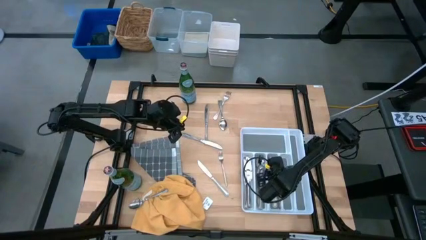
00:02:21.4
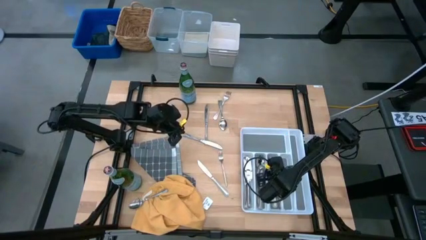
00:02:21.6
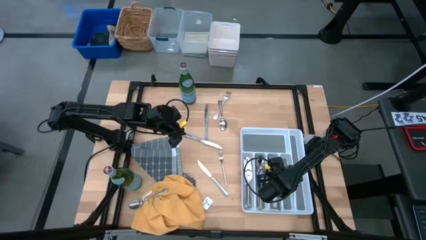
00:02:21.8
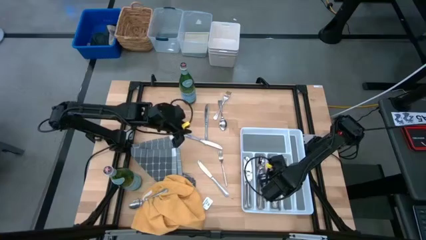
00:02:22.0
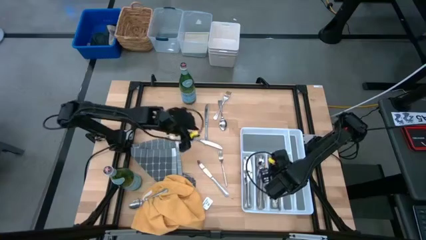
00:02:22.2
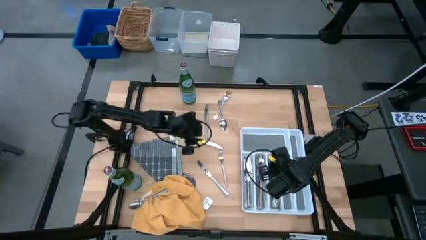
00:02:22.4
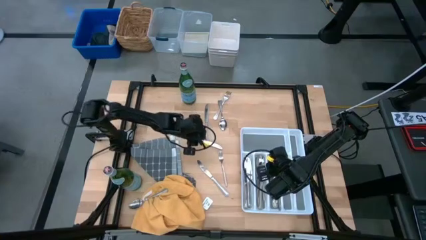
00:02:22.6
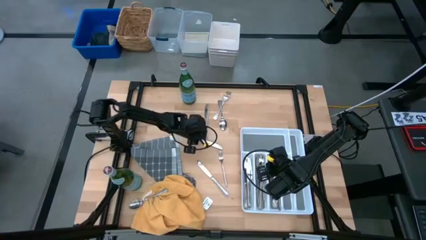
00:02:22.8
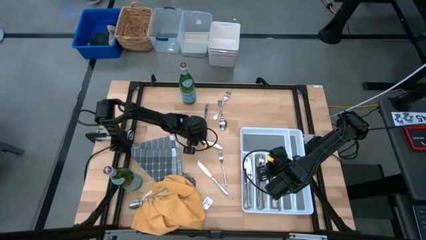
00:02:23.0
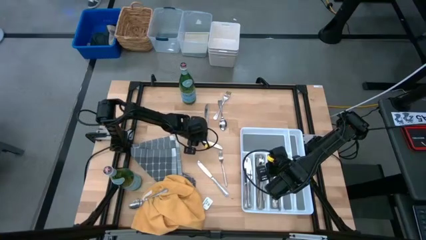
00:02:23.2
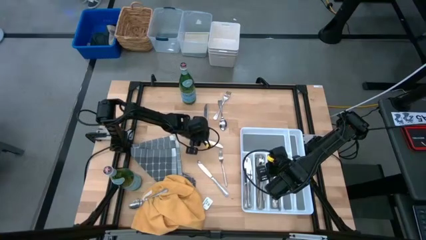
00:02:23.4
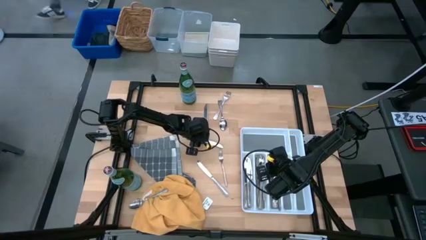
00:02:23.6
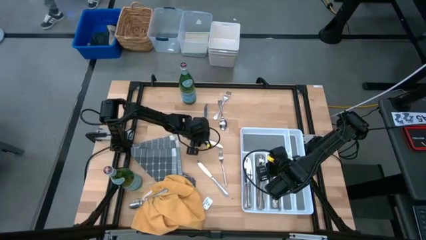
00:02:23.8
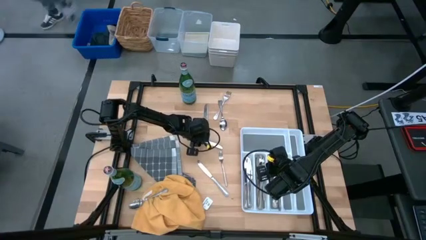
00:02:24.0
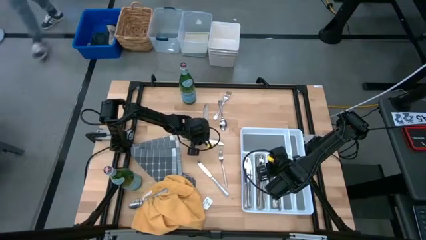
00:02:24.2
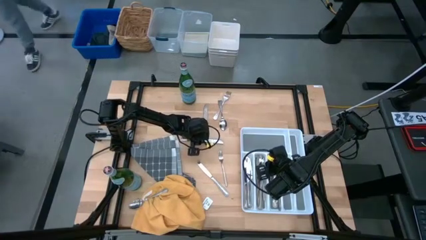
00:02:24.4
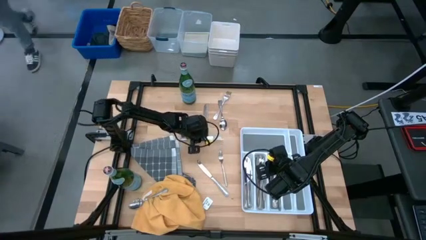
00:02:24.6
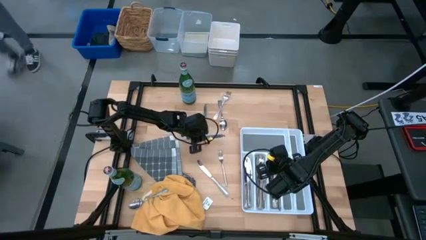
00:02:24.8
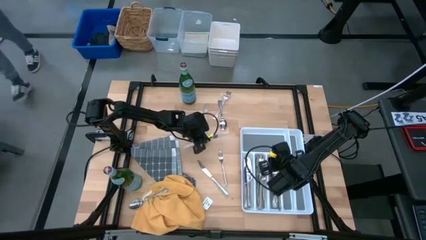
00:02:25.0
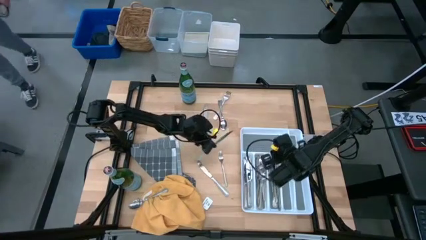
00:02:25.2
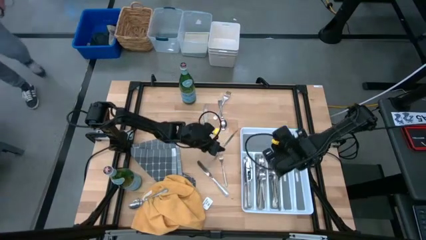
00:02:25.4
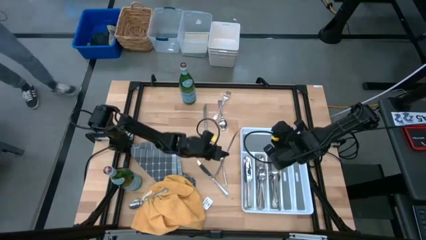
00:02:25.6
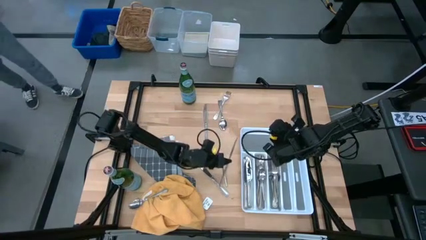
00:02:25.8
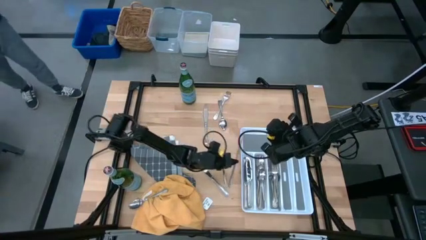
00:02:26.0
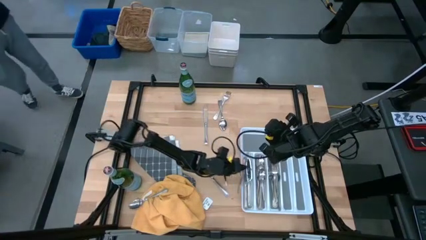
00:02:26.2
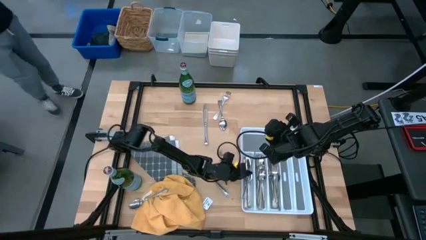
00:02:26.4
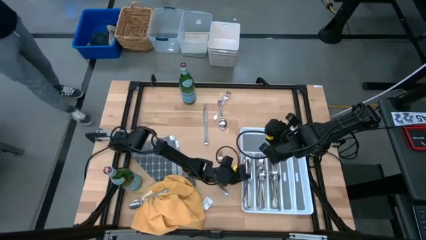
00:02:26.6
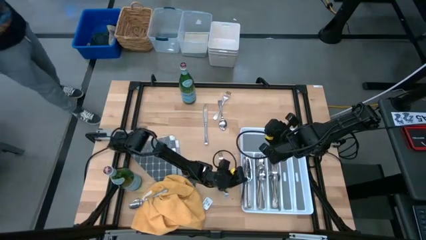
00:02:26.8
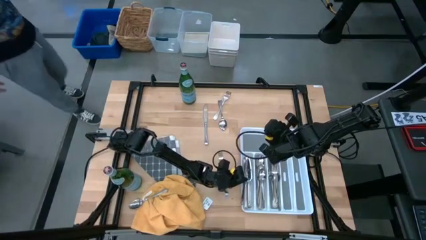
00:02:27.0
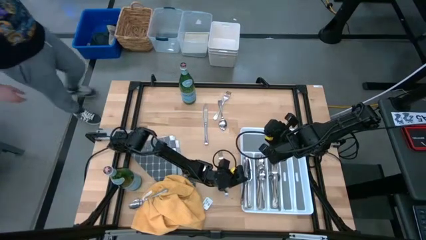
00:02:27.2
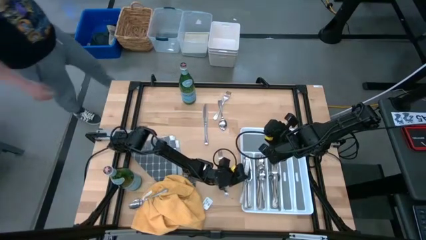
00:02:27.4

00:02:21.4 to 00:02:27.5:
Stack the silver knife into the white utensil tray with the other silver knives

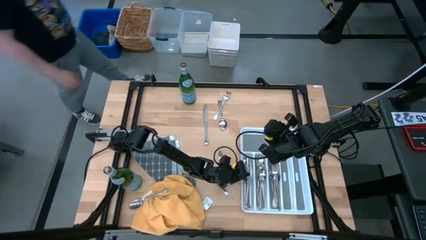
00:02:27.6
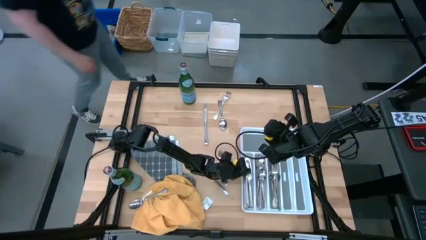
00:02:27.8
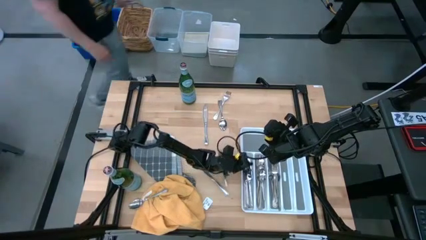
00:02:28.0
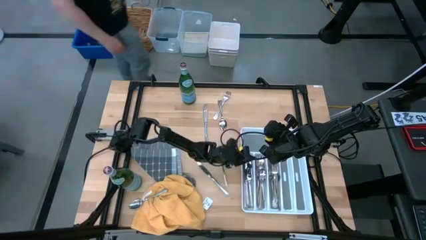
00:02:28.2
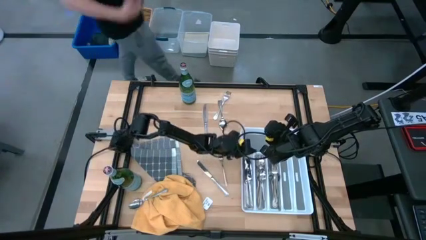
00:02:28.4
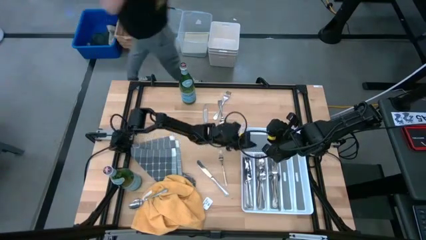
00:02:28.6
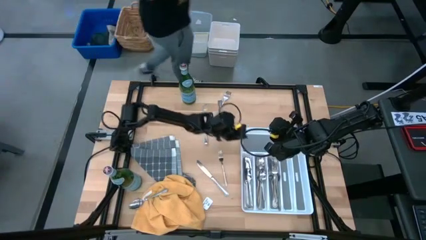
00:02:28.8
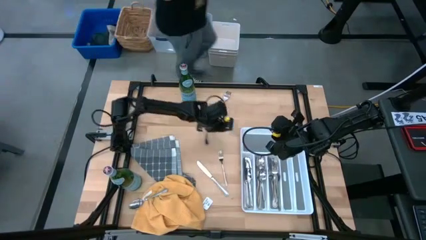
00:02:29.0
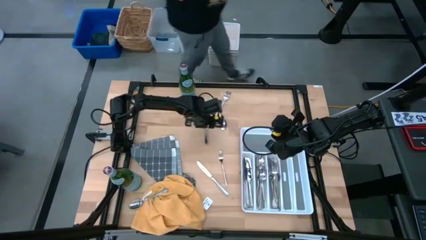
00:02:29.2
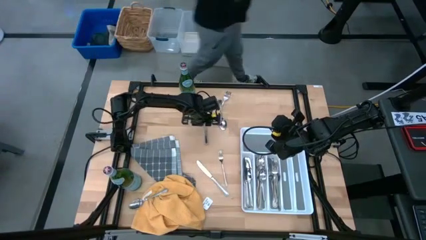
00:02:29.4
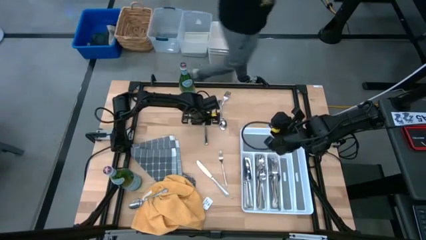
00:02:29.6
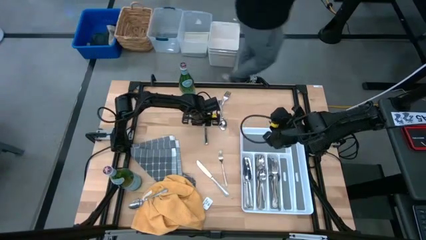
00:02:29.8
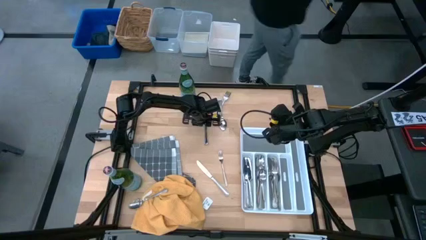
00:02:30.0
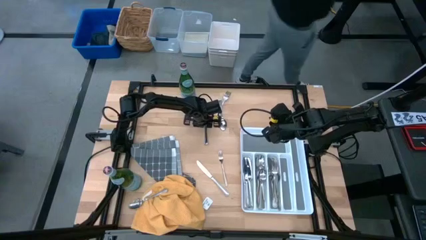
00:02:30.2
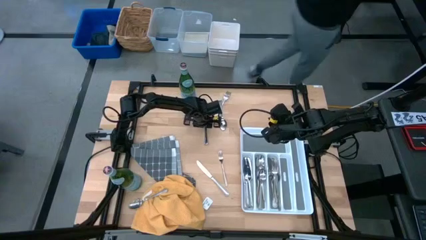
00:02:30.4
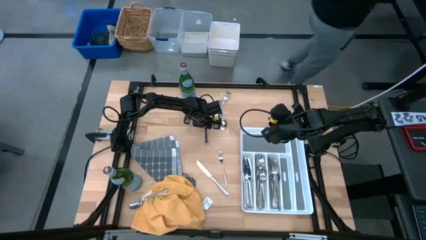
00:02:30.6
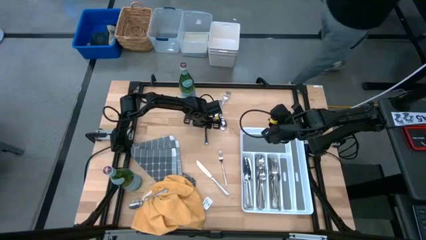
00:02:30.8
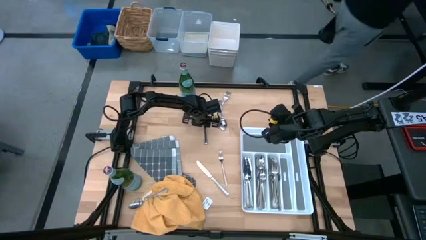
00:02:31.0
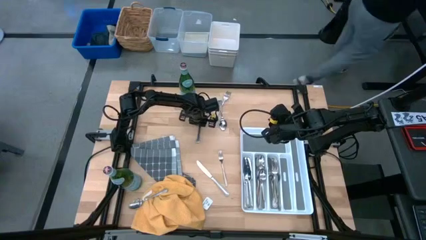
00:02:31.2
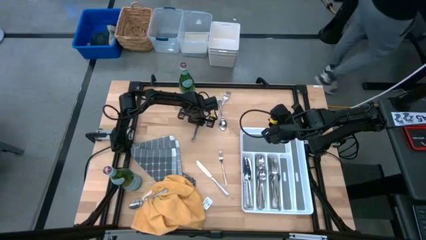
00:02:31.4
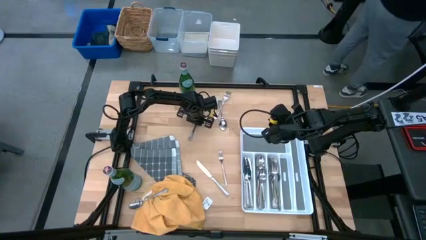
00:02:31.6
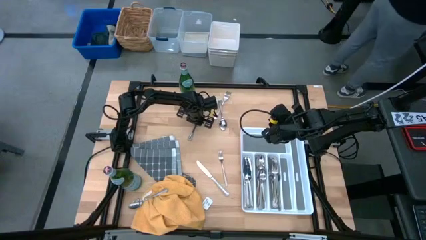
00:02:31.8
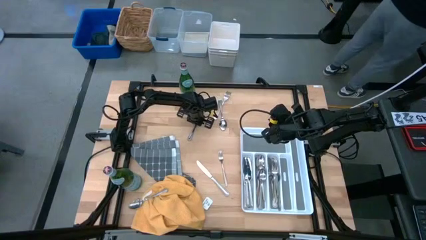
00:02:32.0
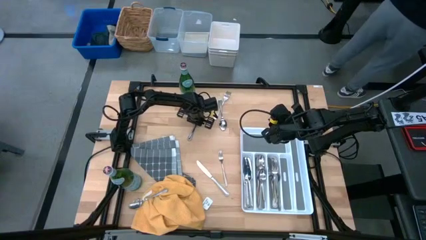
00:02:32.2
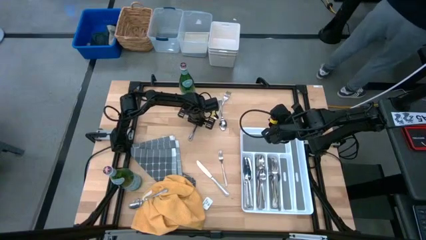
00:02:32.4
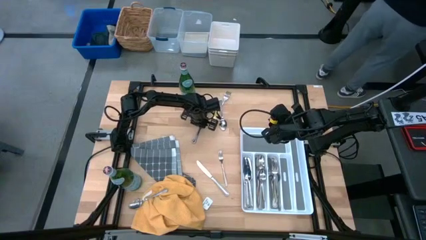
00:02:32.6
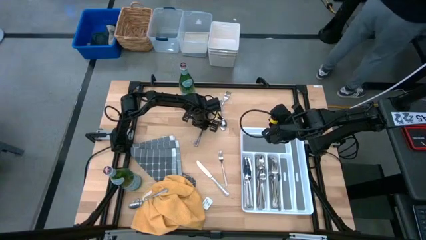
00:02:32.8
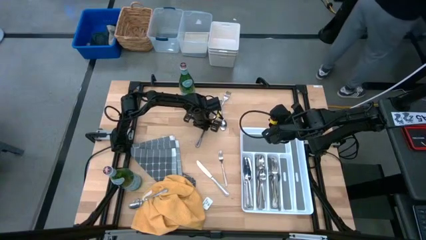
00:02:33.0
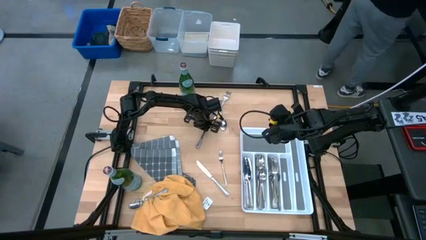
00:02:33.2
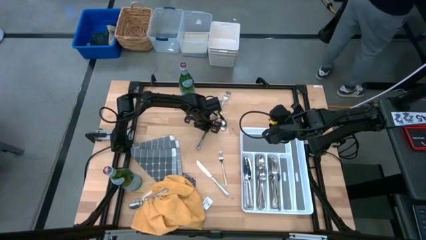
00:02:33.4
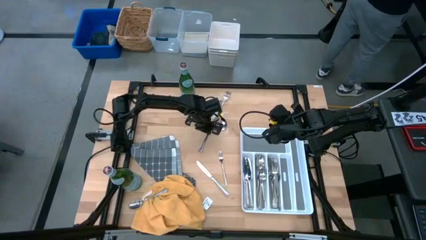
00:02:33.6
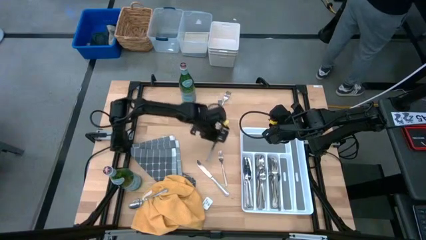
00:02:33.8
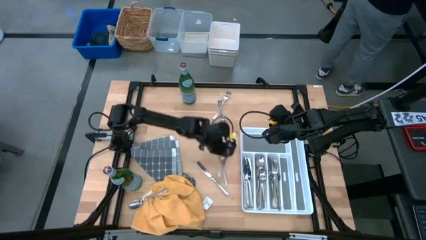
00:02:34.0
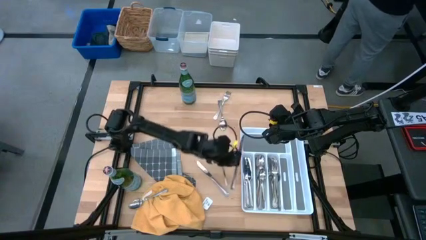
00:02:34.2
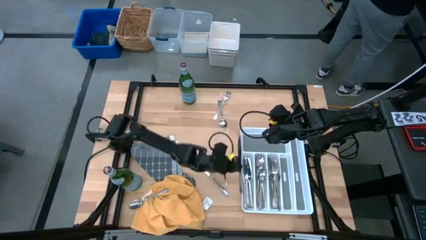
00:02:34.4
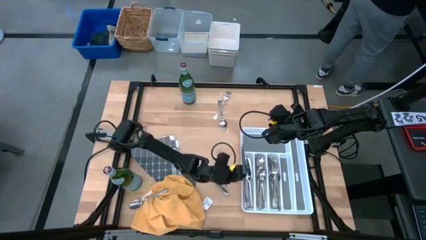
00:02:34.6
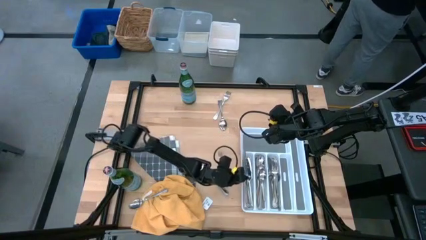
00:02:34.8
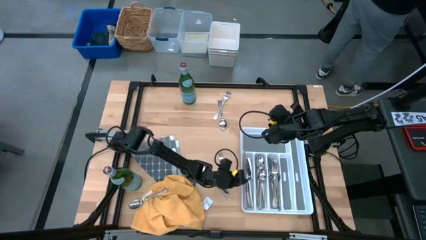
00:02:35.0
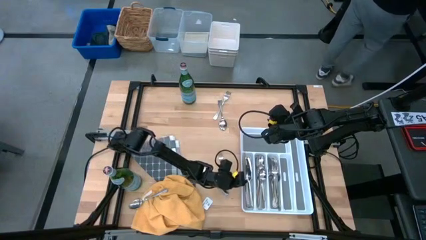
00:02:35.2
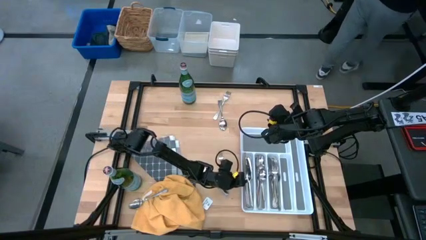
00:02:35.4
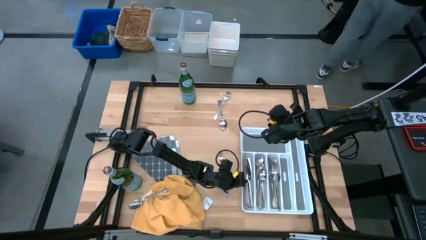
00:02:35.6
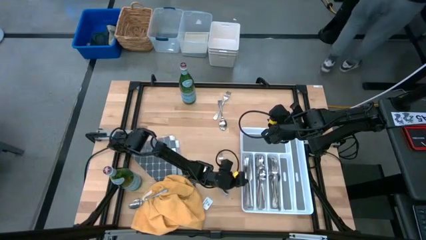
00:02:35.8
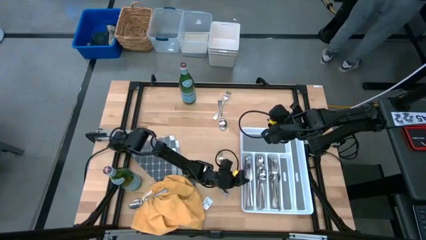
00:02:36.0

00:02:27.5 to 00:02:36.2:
Stack the silver knife into the white utensil tray with the other silver knives
